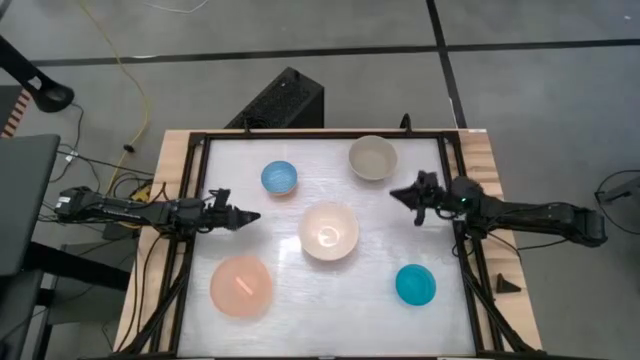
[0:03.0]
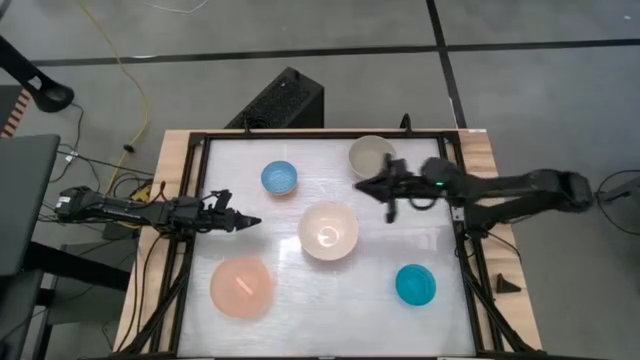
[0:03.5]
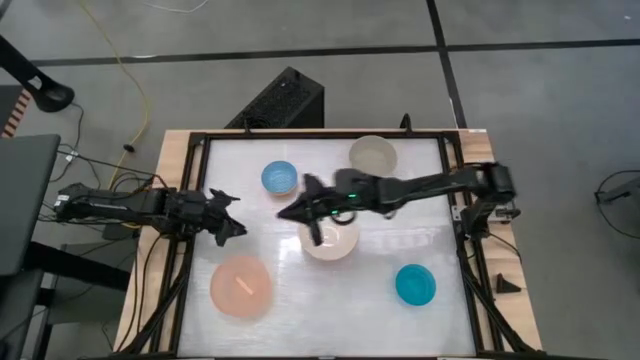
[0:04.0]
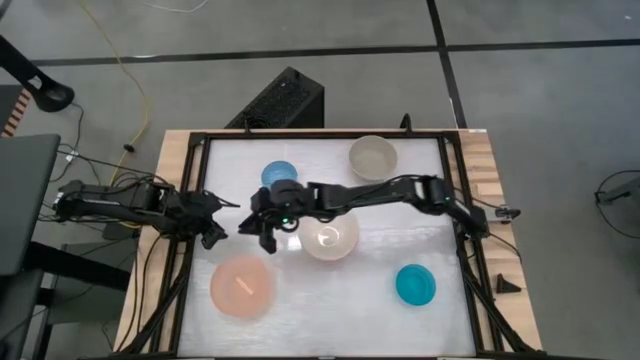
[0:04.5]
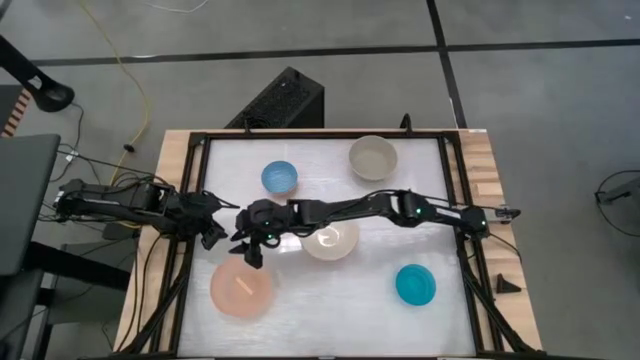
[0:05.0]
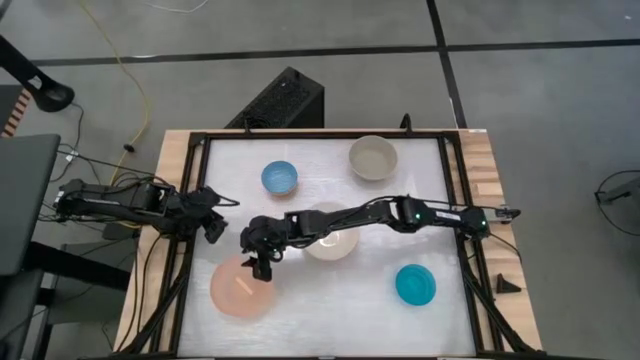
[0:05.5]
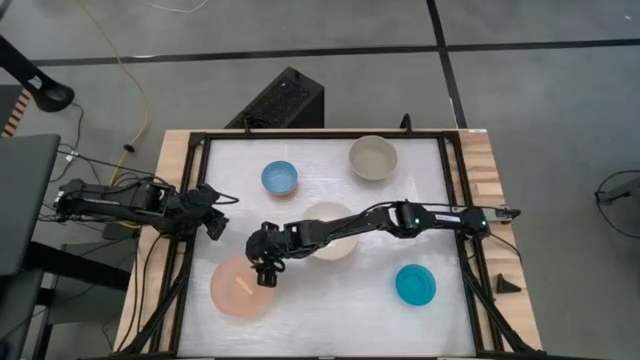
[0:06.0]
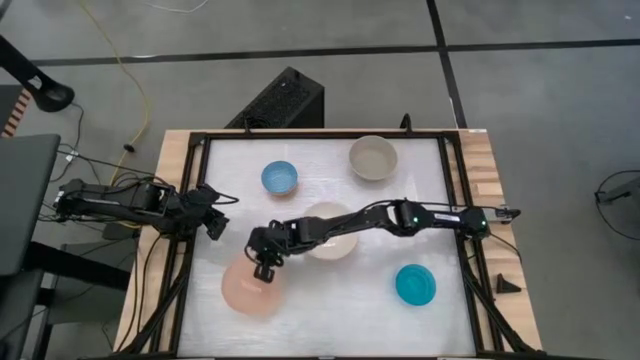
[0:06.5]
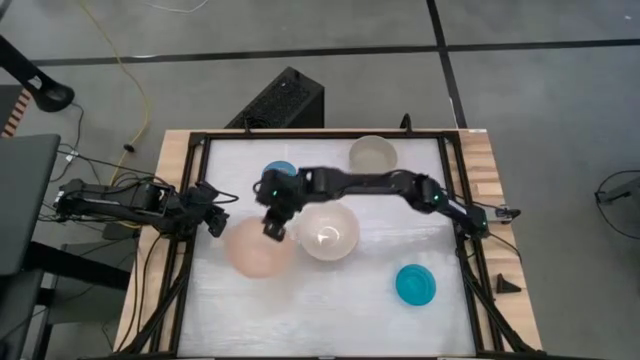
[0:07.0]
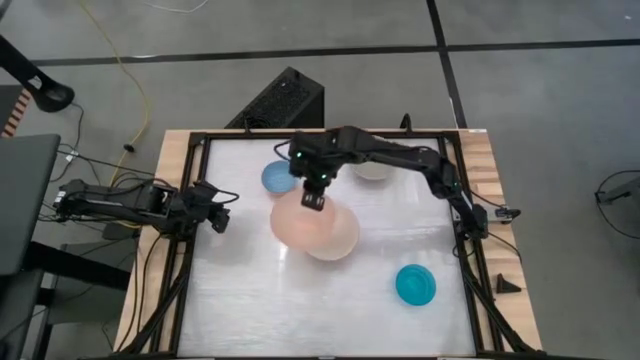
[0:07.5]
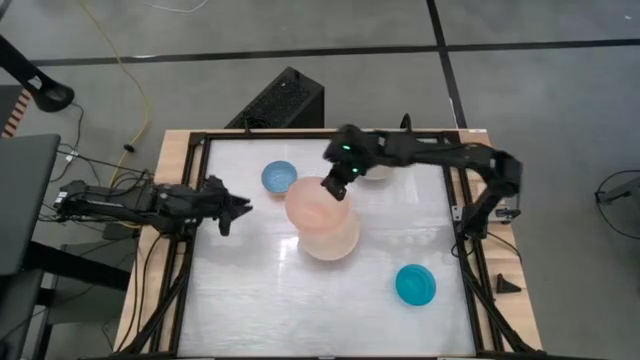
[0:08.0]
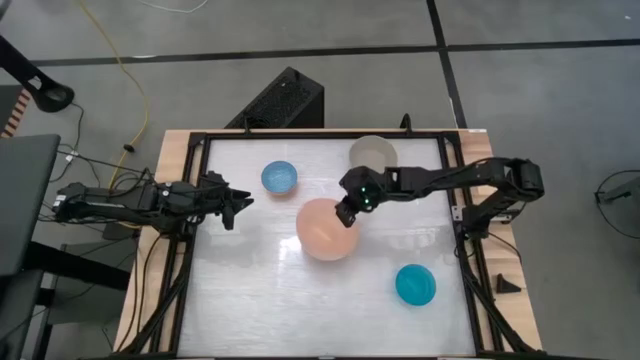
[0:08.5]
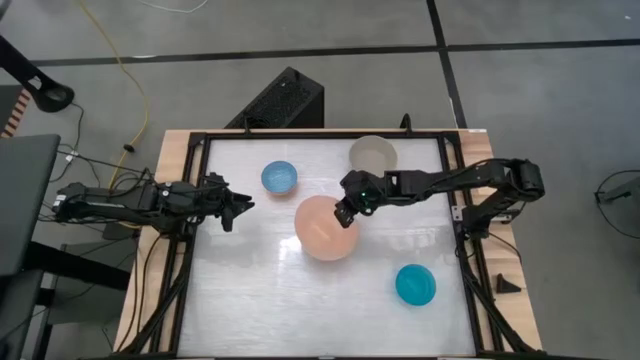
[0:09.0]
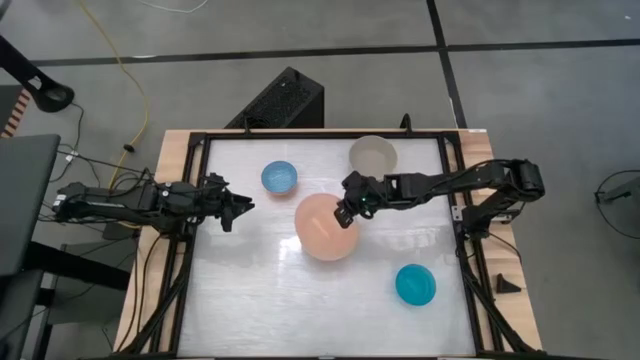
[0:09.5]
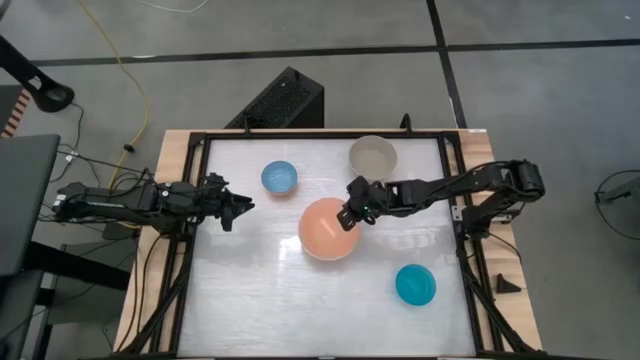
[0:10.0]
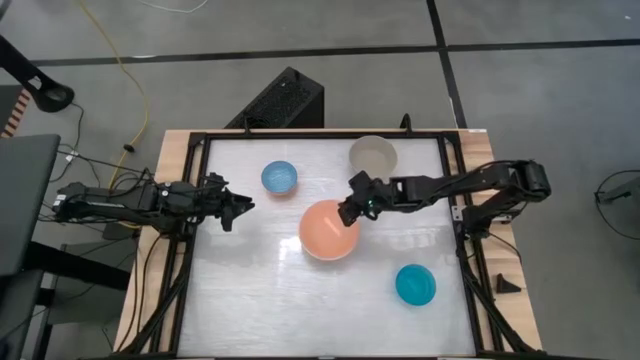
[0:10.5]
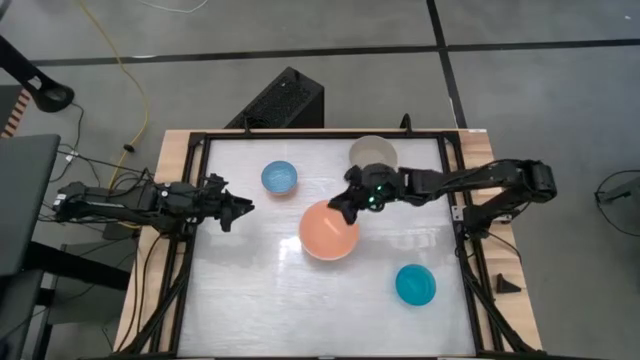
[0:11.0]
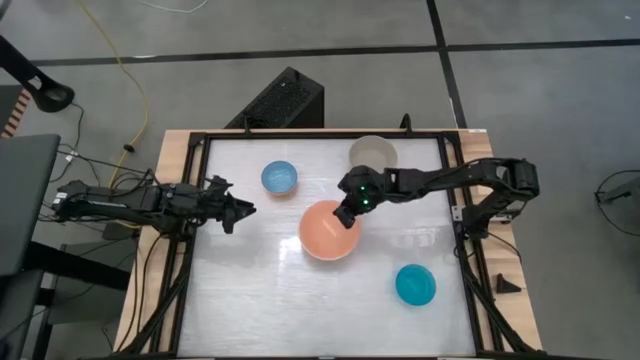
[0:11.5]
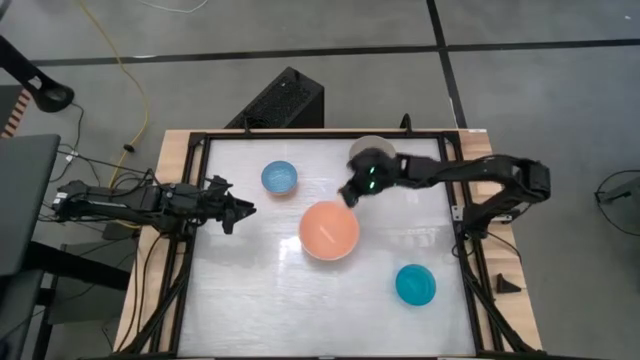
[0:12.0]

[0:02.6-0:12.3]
Stack the light orange bowl on top of the white bowl

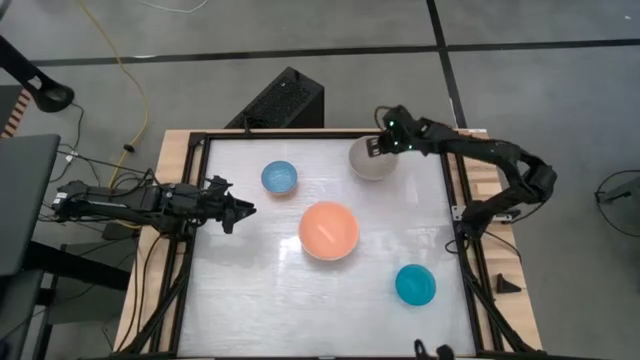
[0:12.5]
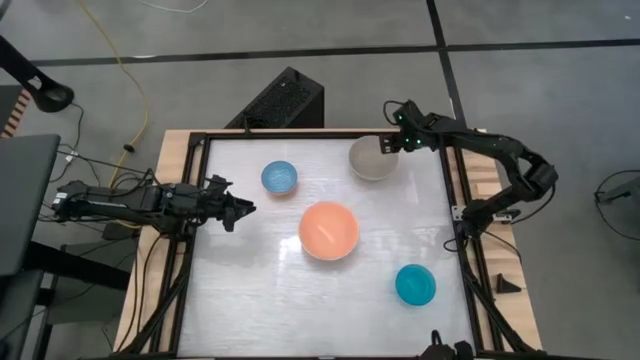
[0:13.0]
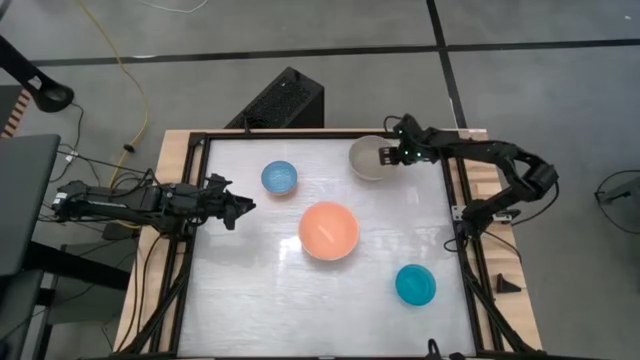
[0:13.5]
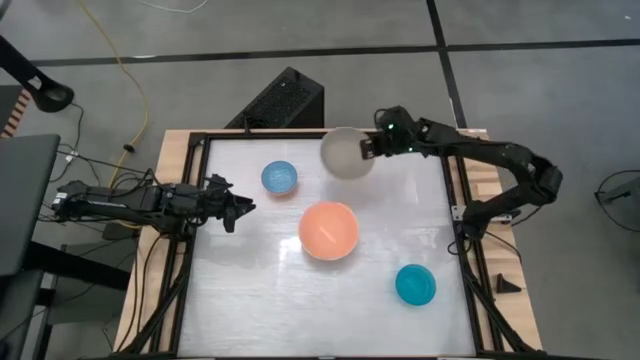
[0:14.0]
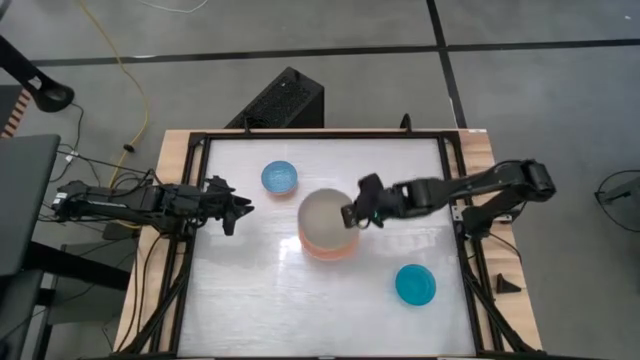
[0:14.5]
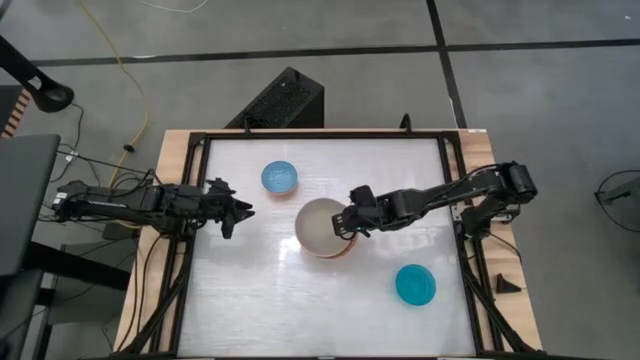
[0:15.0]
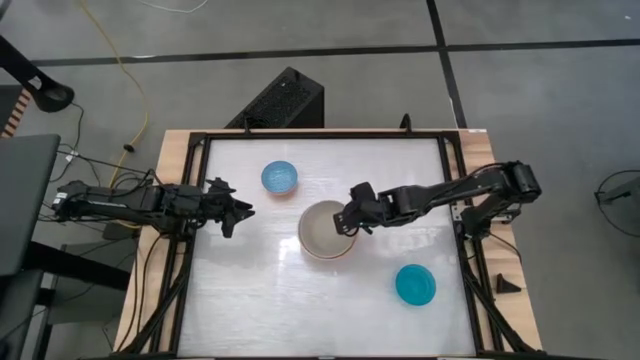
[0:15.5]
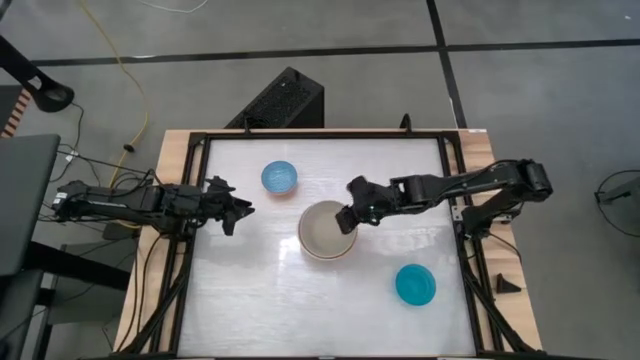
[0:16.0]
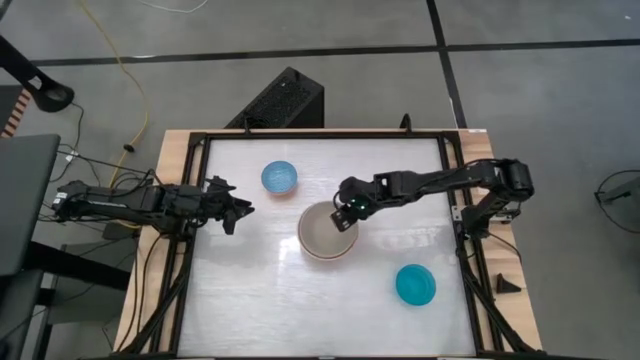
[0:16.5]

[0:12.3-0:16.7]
Stack the grey bowl on top of the light orange bowl

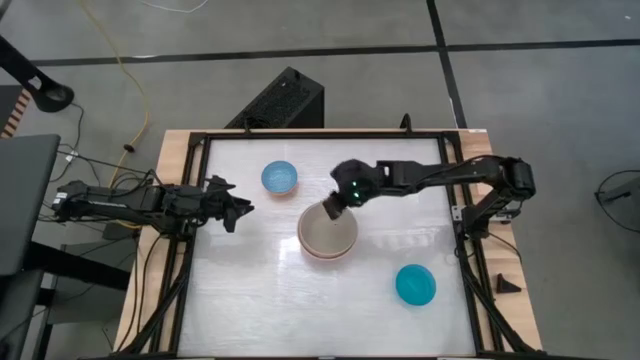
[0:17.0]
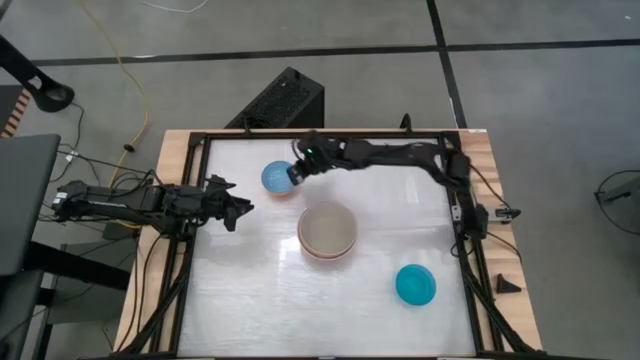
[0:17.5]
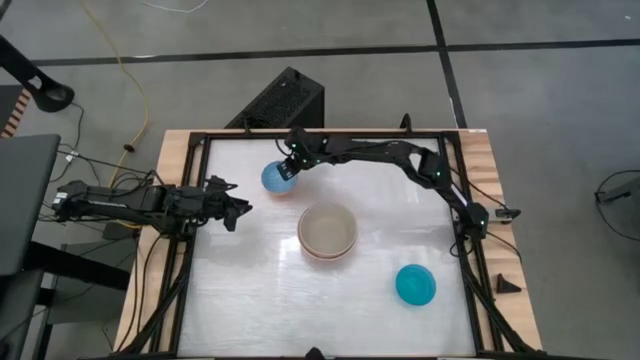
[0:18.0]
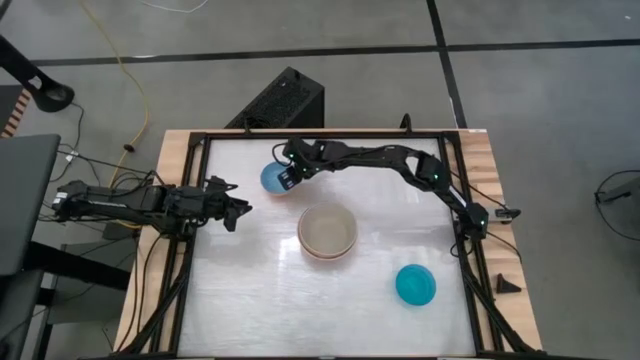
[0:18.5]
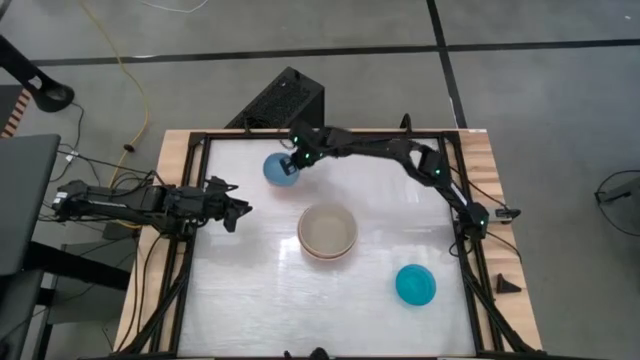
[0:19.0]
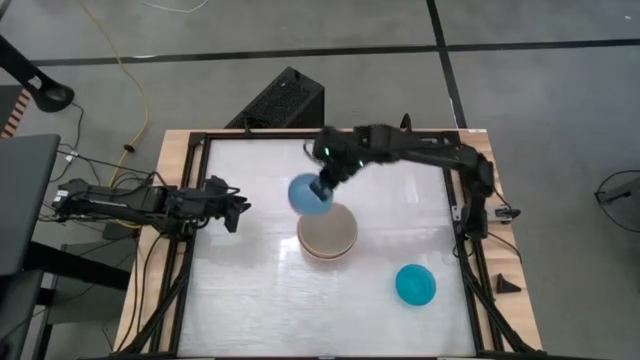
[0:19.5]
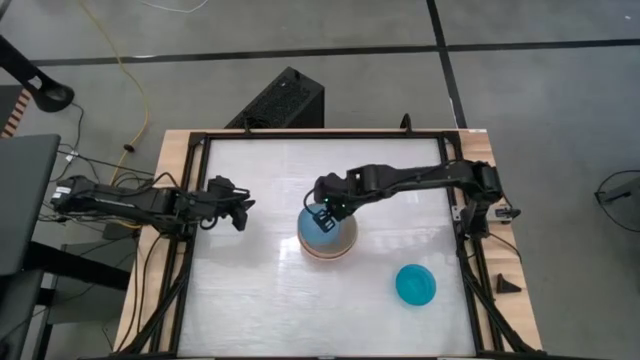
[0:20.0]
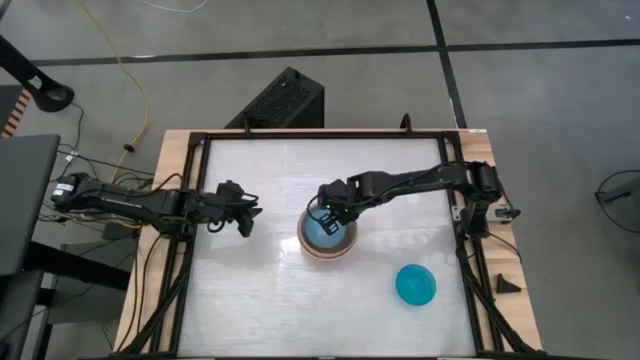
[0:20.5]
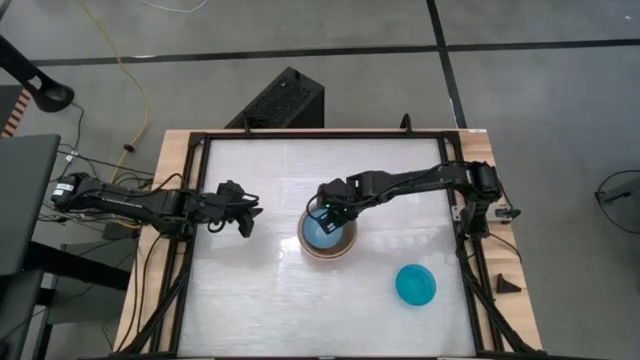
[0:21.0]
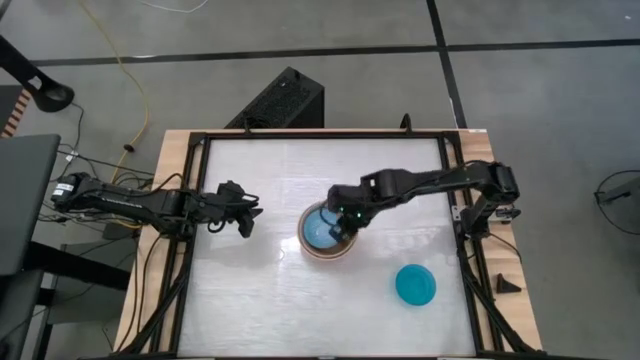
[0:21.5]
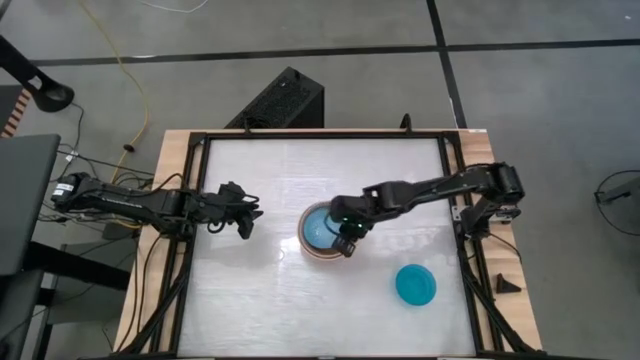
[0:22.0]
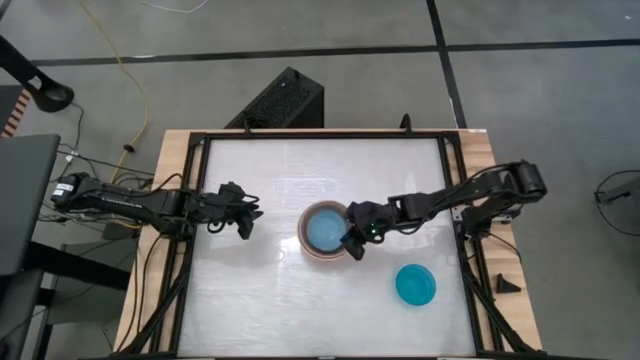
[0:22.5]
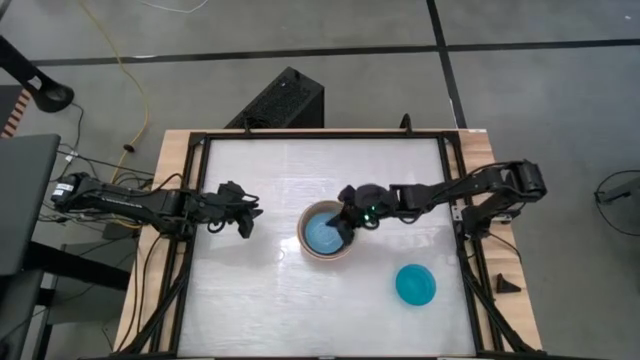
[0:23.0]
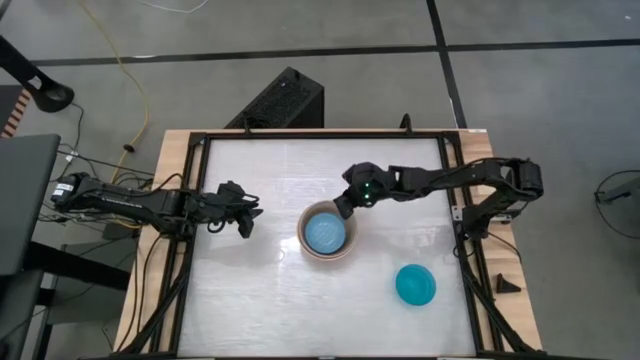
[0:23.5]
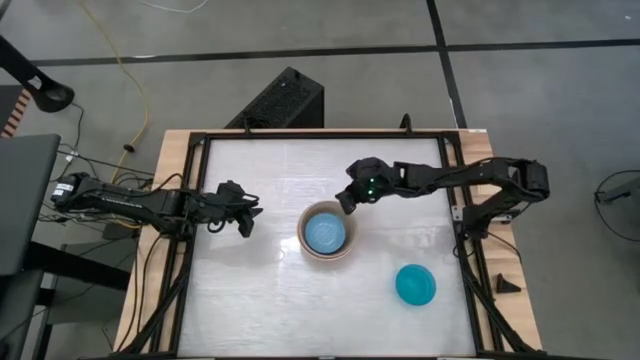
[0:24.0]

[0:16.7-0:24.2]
Stack the blue patterned bowl on top of the grey bowl

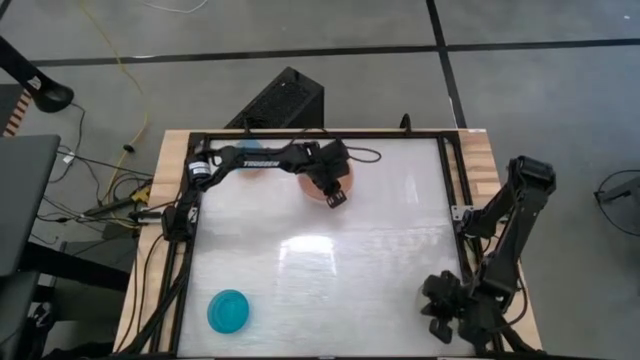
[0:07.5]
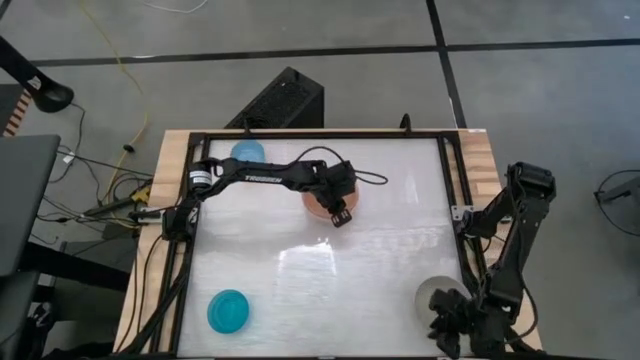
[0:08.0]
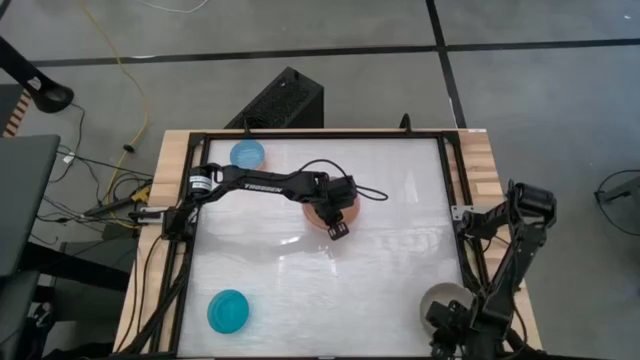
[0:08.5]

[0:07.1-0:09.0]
Move the bowl in the middle
